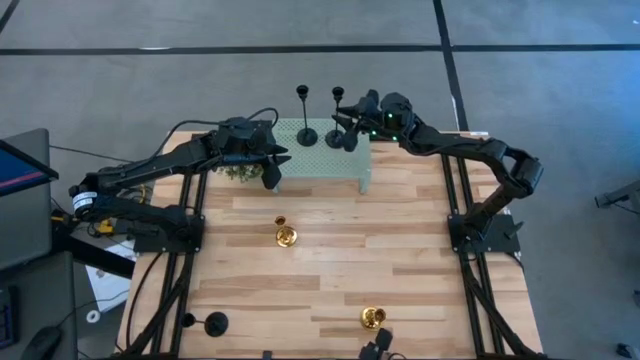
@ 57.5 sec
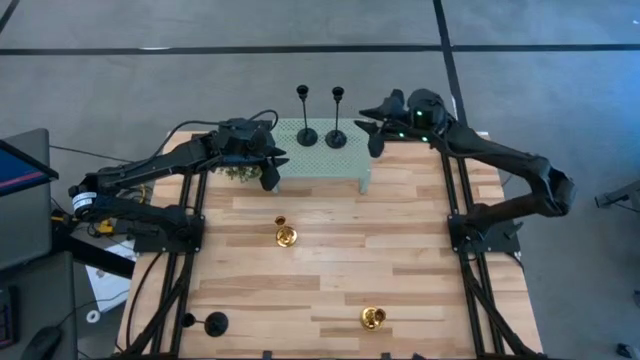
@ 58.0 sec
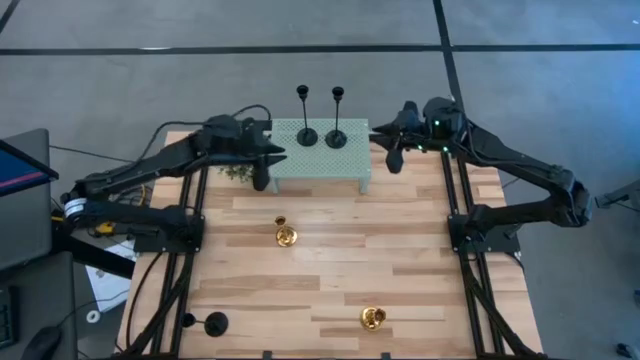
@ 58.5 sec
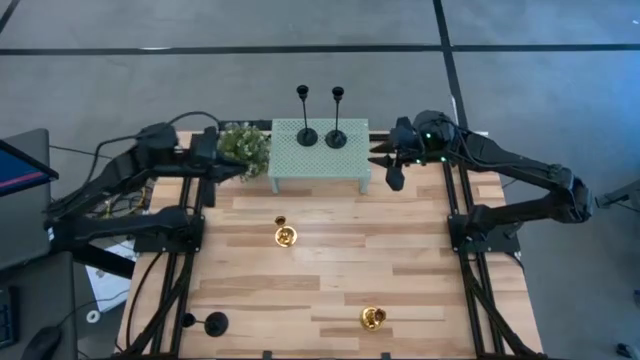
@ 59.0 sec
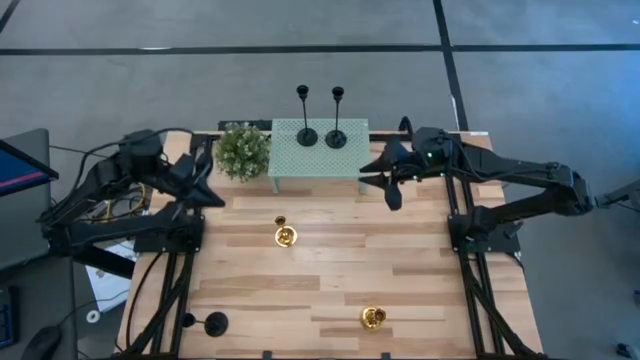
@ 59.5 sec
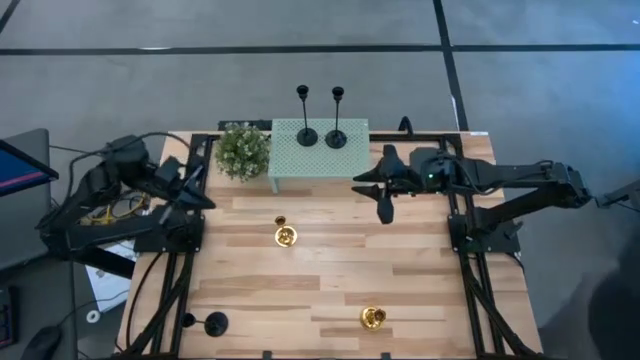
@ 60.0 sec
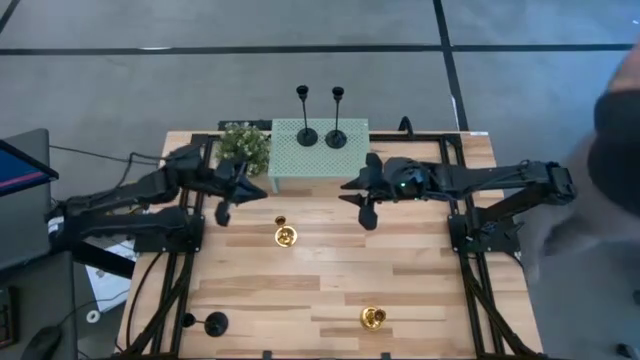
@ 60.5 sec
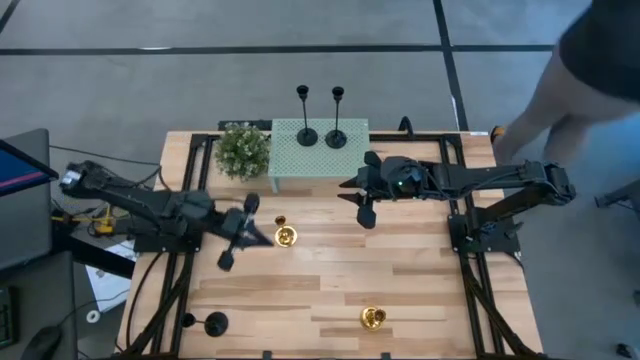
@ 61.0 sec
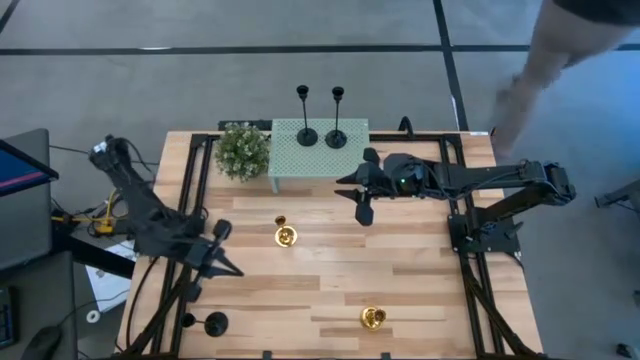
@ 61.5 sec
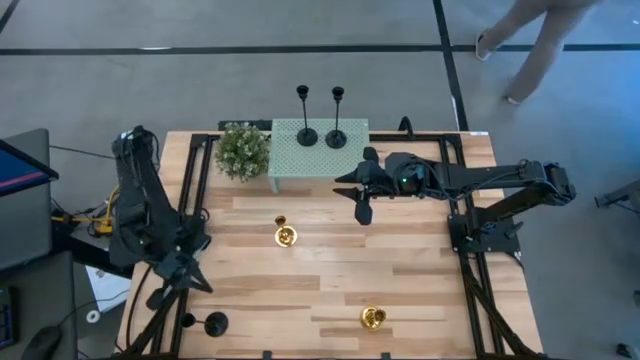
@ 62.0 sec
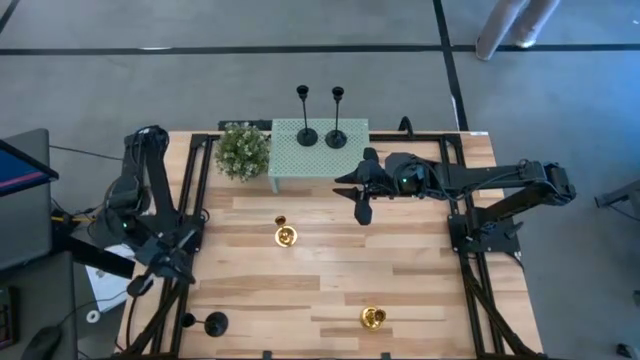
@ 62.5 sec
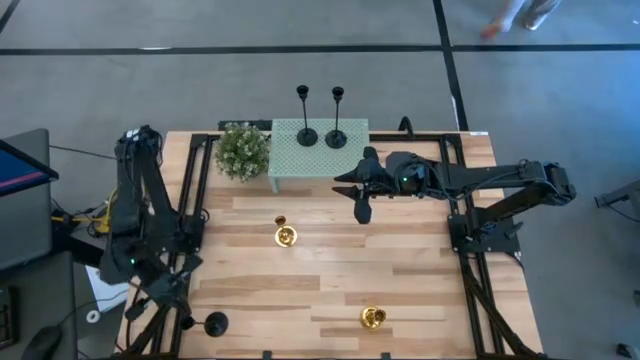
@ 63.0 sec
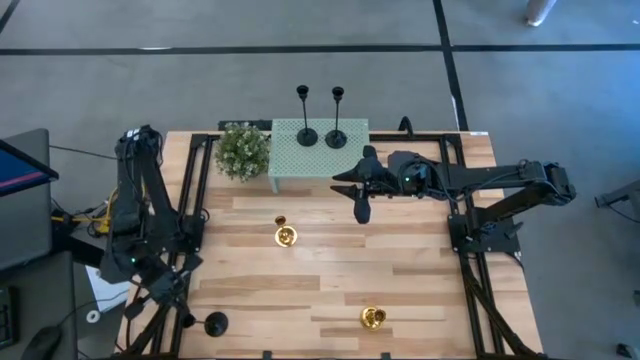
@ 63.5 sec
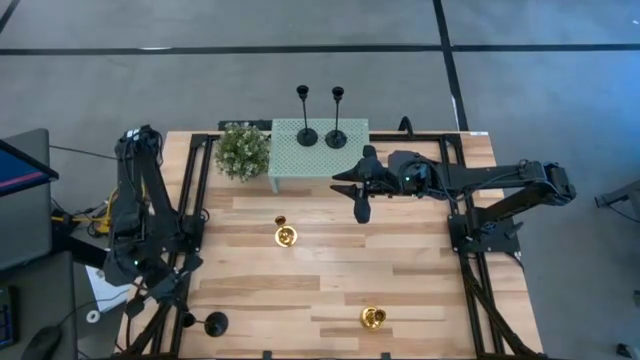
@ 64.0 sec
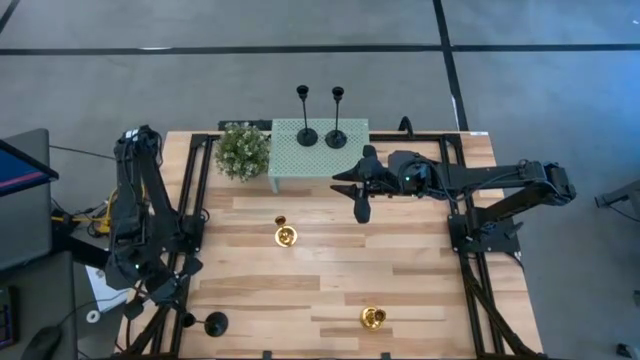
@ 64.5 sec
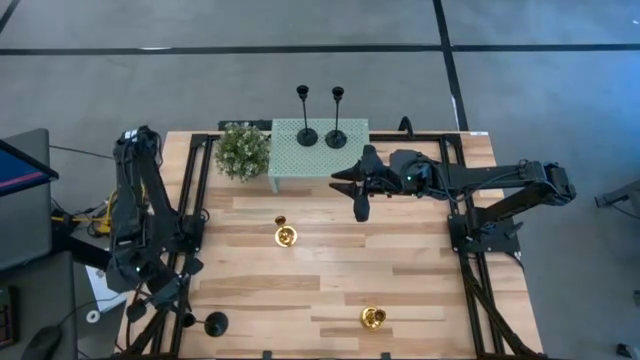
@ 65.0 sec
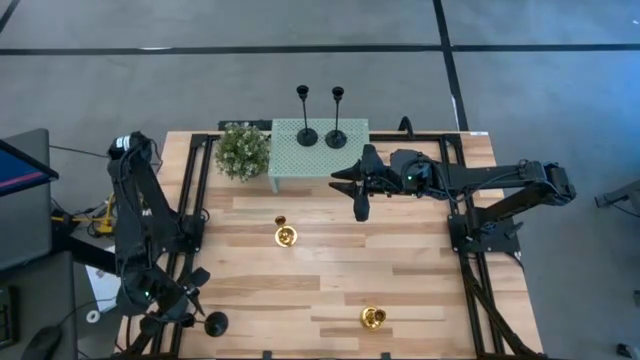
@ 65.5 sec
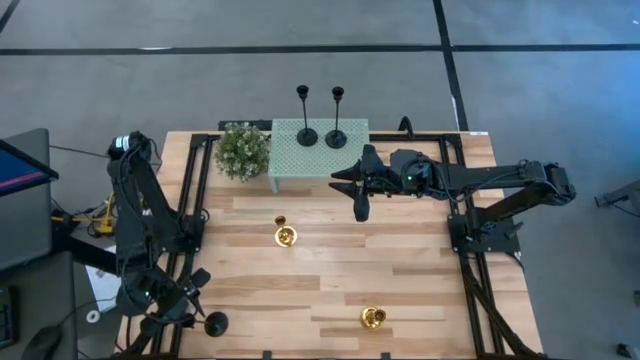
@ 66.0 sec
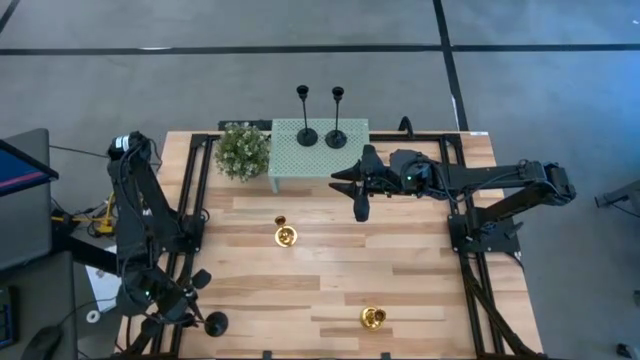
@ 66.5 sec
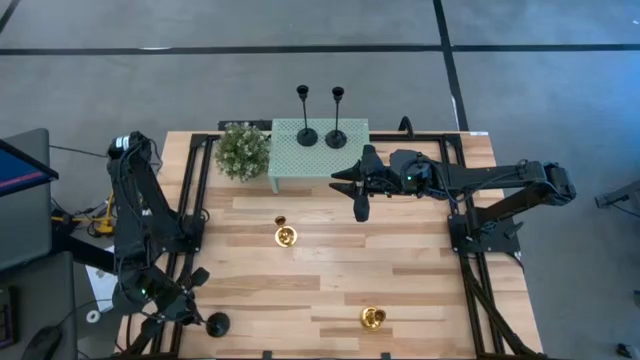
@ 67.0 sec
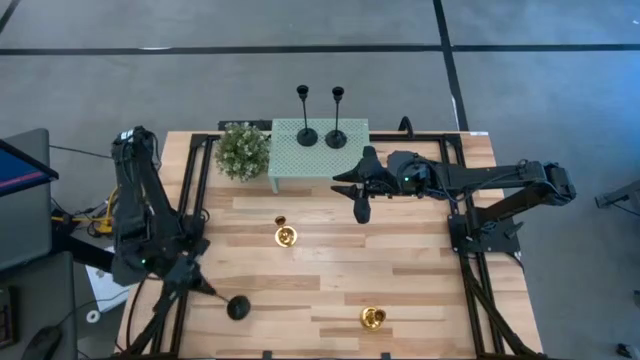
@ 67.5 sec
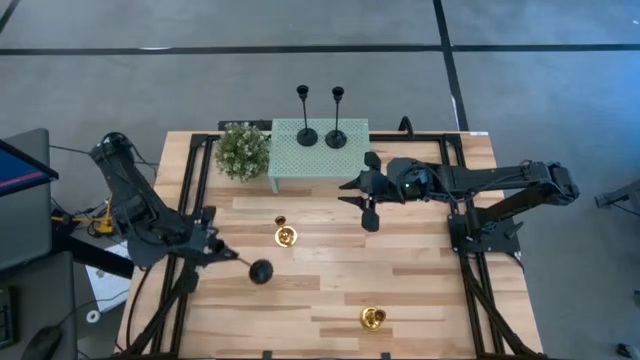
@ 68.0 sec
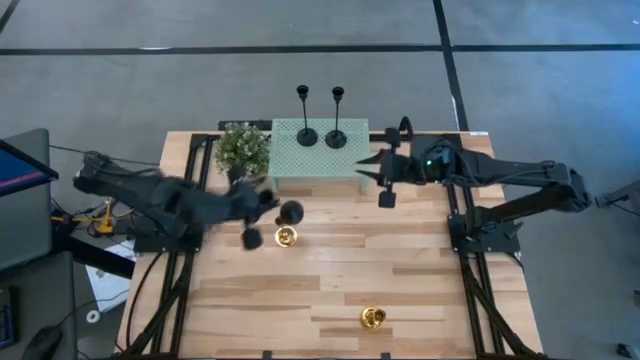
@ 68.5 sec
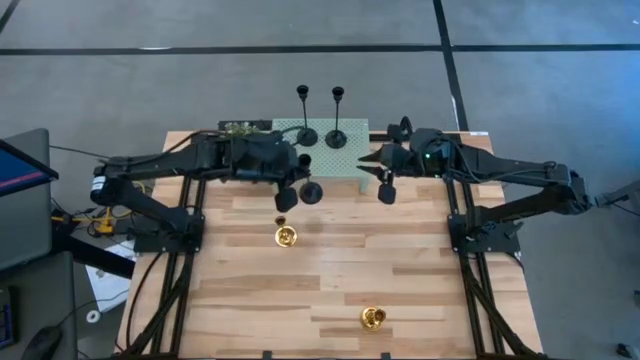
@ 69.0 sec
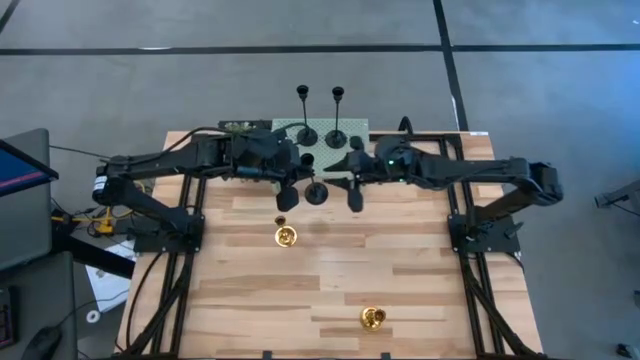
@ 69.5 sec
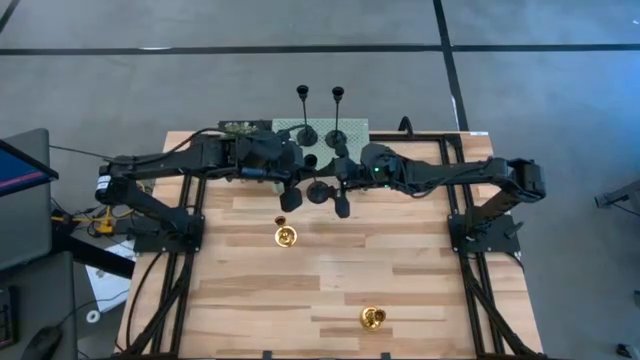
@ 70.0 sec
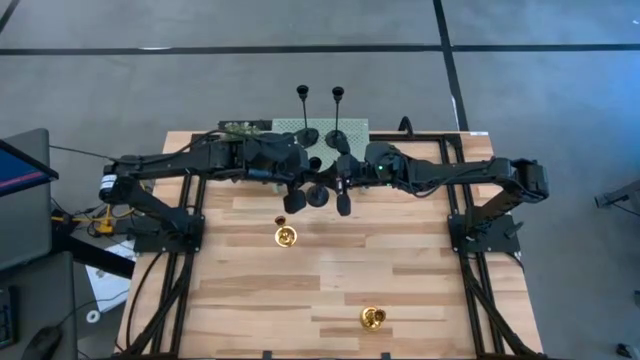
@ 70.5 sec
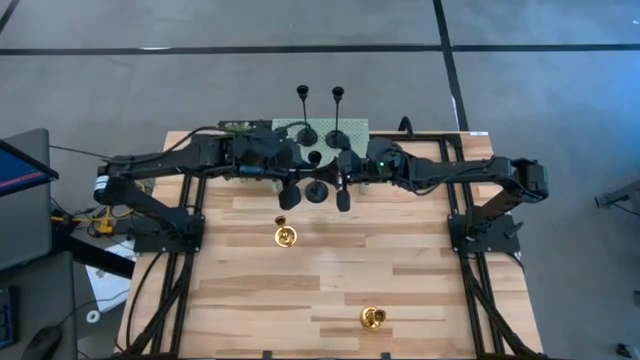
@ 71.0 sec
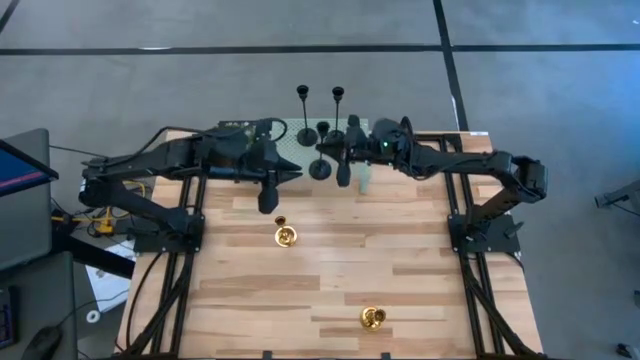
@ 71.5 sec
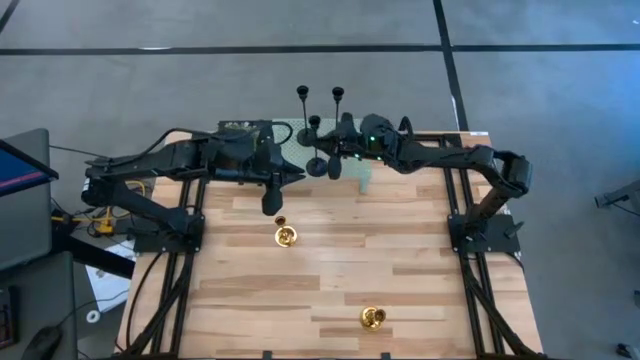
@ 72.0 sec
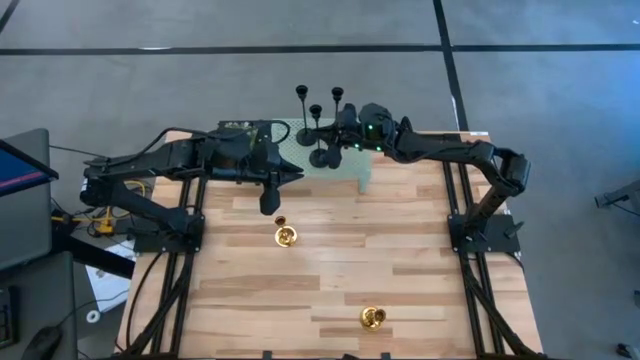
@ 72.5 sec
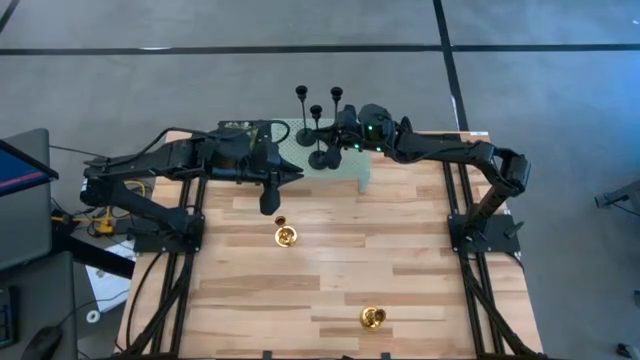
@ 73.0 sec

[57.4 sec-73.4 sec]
Task: Pick & Place candle stick holders
Put the black candle holder on the shelf

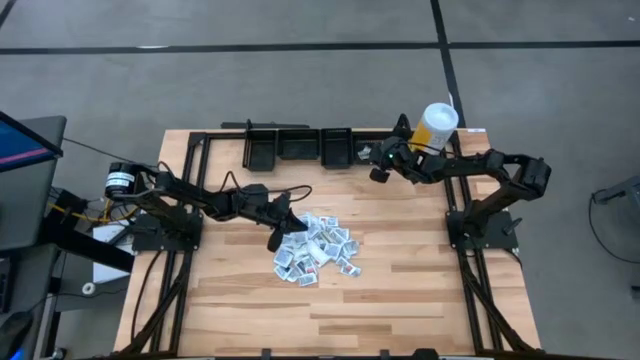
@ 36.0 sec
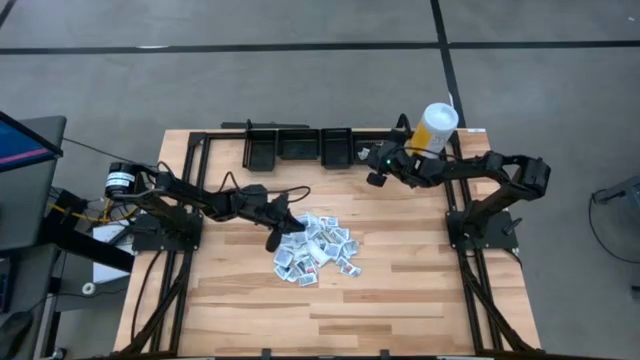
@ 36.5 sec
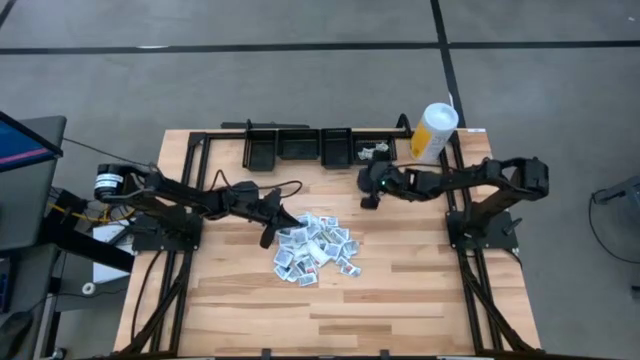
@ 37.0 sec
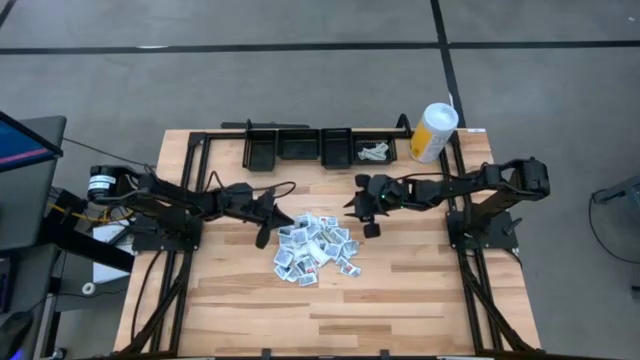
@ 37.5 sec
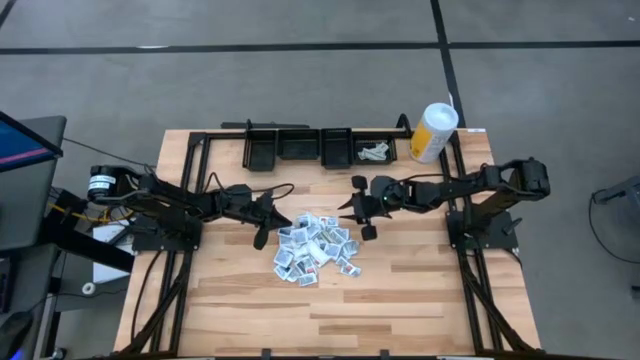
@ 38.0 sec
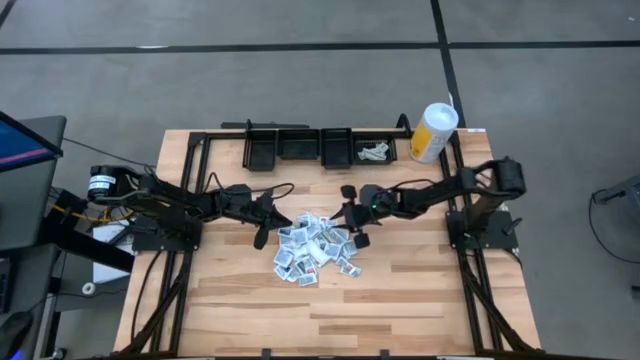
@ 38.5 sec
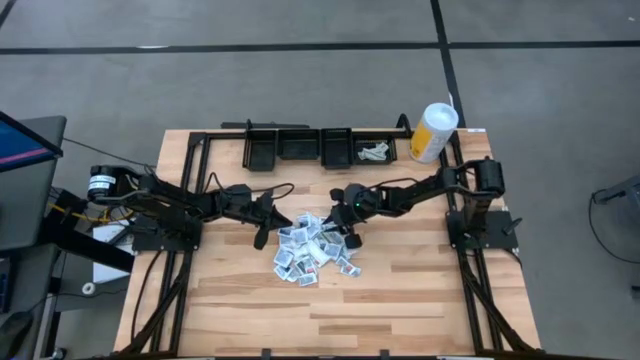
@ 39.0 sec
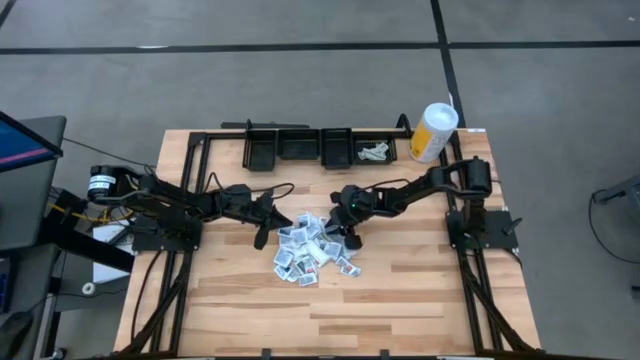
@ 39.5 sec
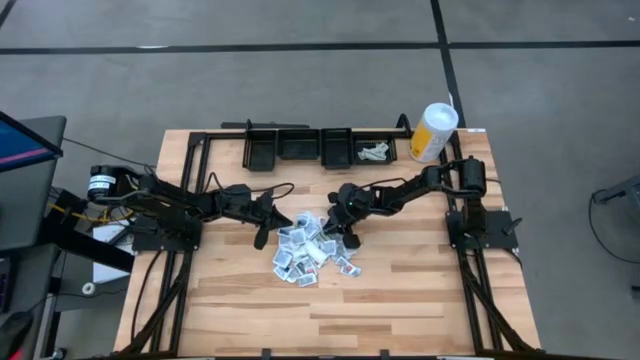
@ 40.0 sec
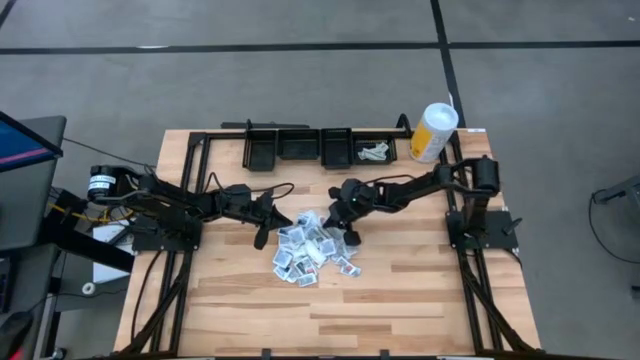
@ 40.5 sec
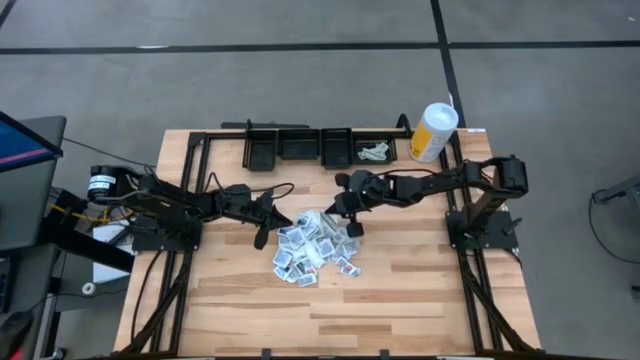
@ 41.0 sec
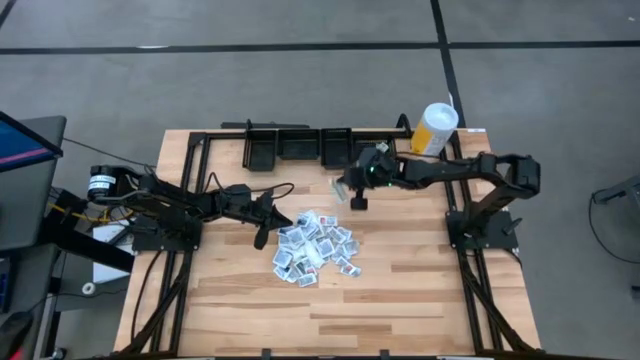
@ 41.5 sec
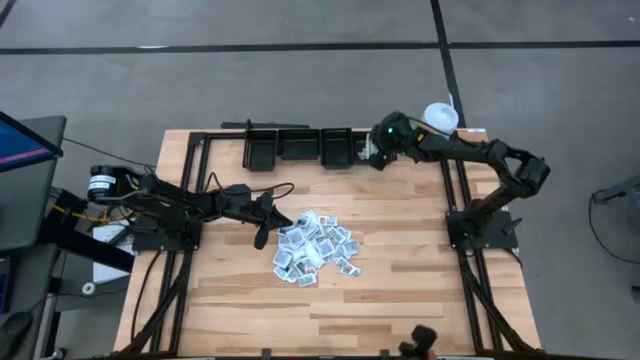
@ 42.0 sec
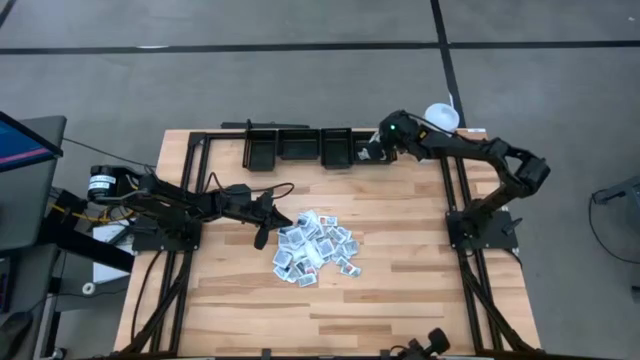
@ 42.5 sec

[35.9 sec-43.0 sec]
Task: Pick & Place First Aid Supplies
Put the green bandage pack into the right black bin
